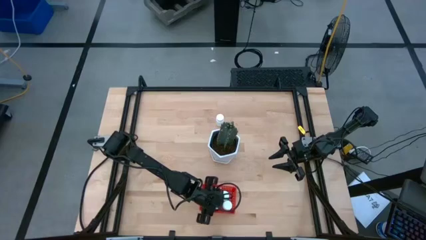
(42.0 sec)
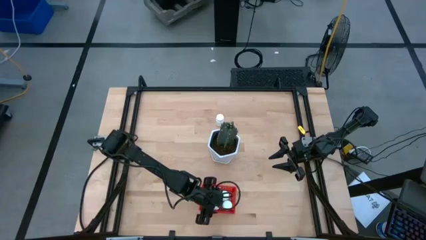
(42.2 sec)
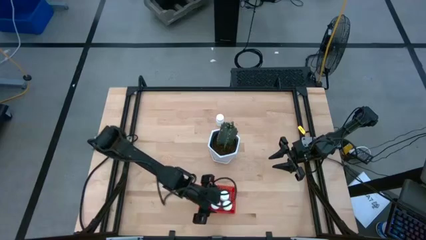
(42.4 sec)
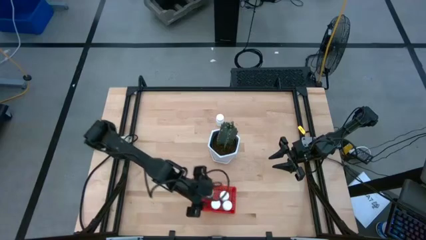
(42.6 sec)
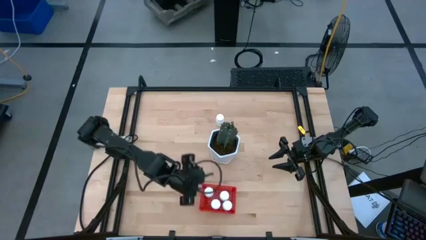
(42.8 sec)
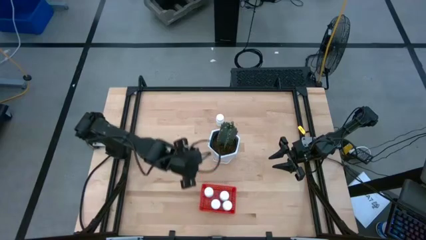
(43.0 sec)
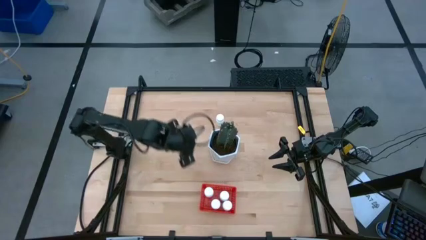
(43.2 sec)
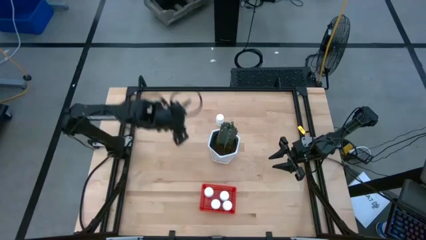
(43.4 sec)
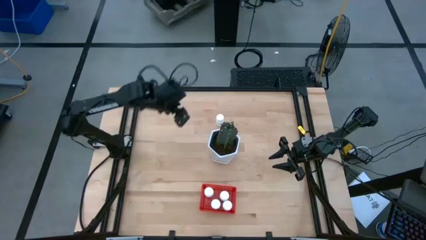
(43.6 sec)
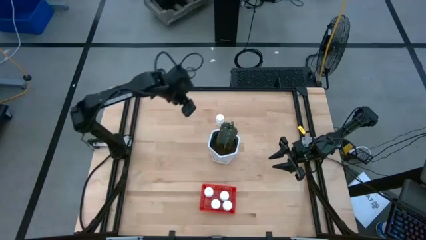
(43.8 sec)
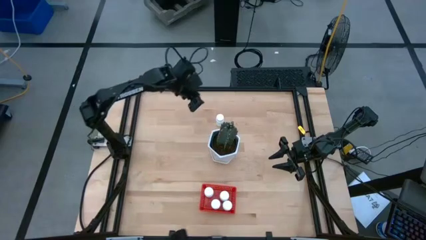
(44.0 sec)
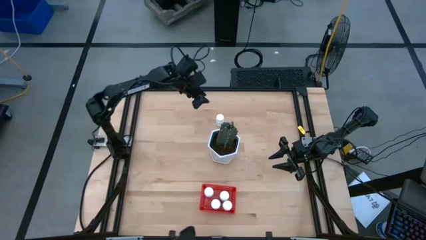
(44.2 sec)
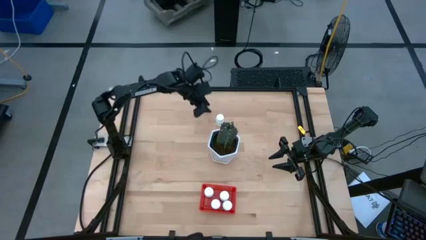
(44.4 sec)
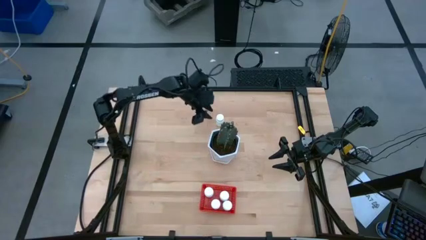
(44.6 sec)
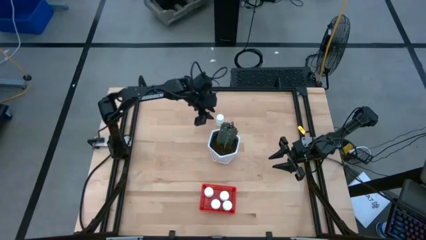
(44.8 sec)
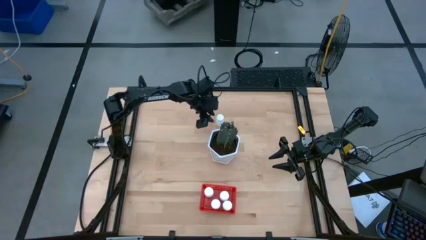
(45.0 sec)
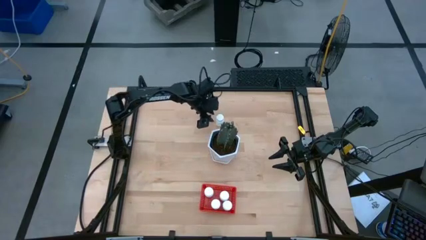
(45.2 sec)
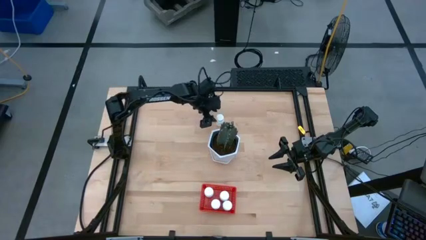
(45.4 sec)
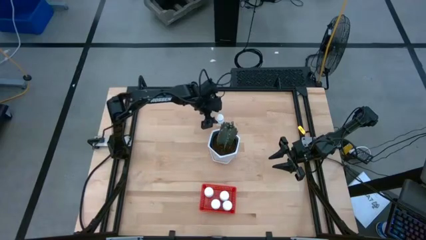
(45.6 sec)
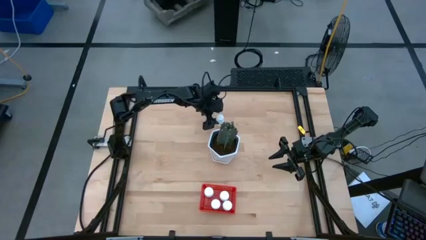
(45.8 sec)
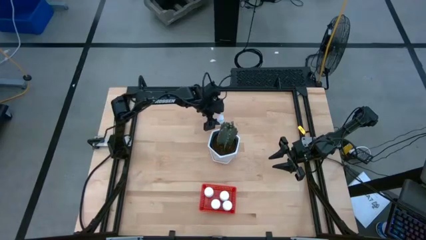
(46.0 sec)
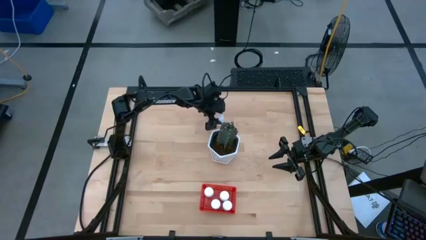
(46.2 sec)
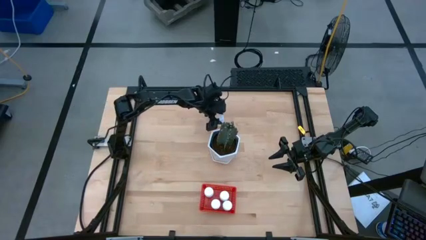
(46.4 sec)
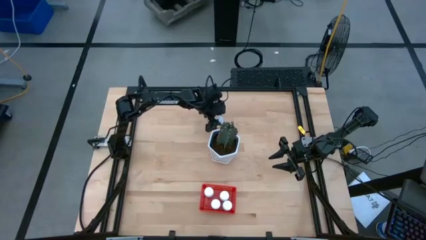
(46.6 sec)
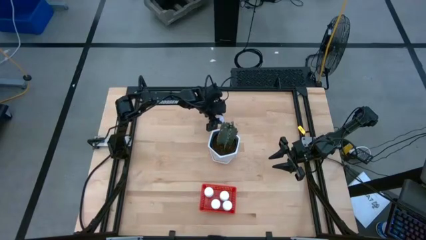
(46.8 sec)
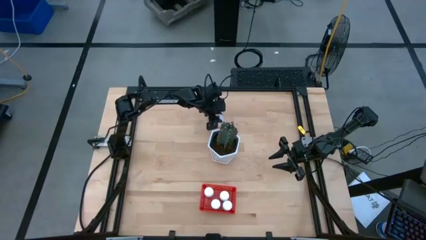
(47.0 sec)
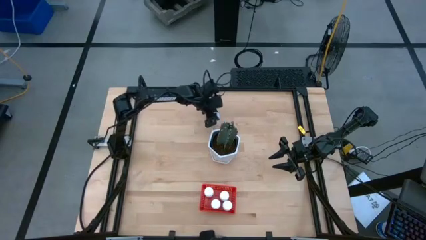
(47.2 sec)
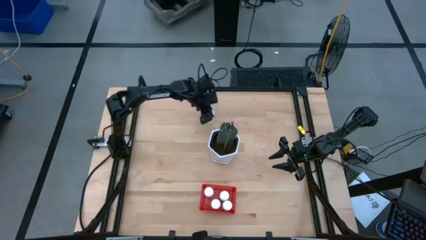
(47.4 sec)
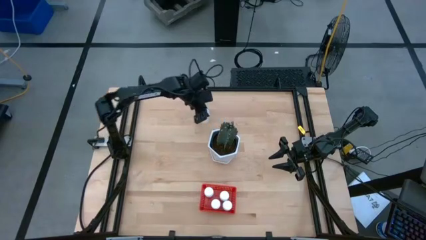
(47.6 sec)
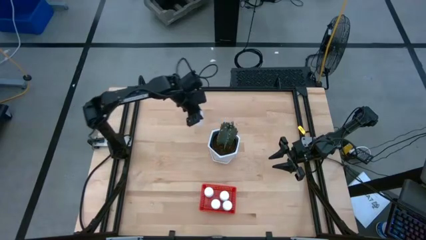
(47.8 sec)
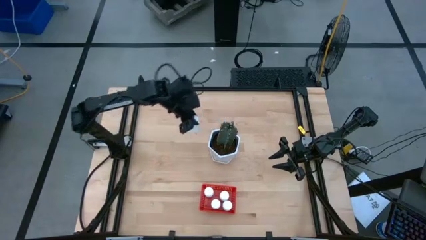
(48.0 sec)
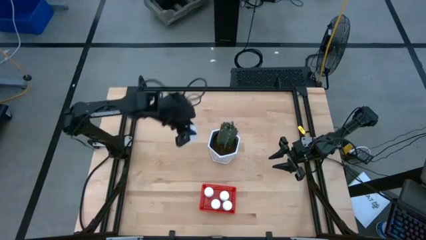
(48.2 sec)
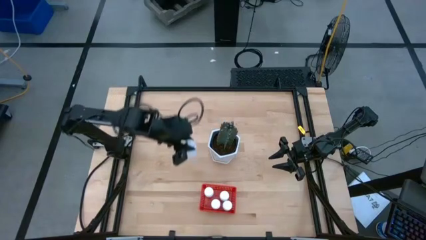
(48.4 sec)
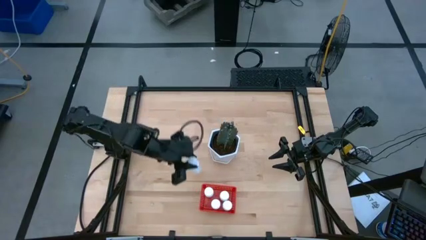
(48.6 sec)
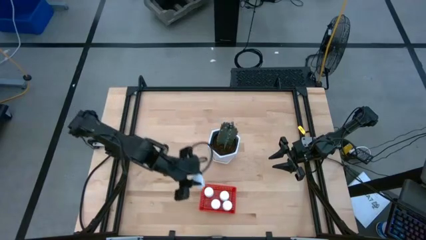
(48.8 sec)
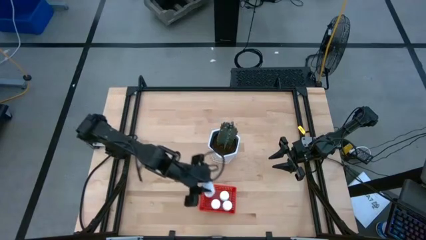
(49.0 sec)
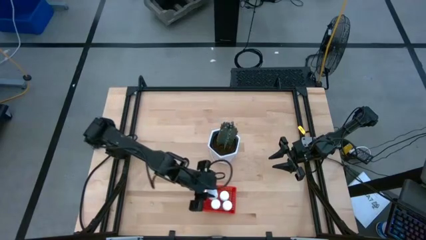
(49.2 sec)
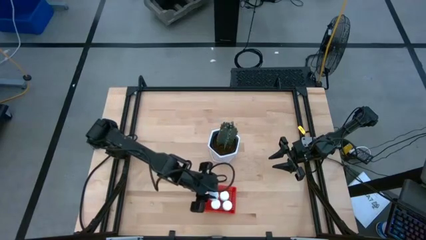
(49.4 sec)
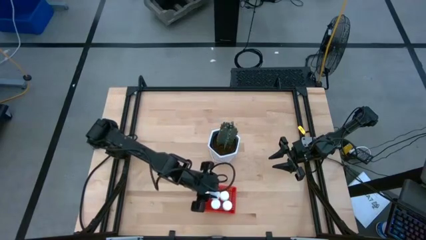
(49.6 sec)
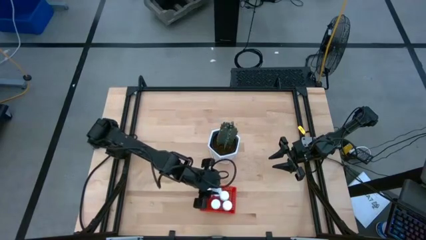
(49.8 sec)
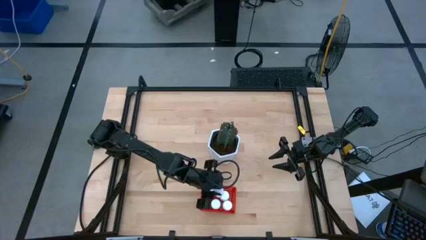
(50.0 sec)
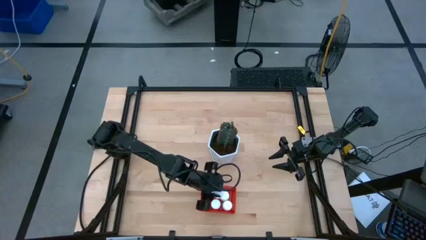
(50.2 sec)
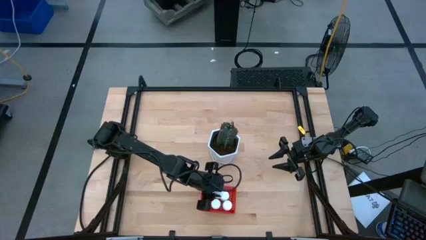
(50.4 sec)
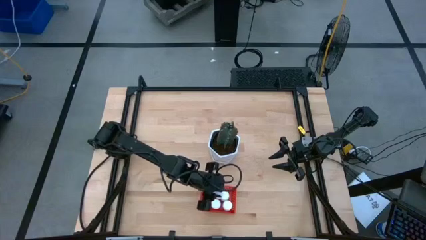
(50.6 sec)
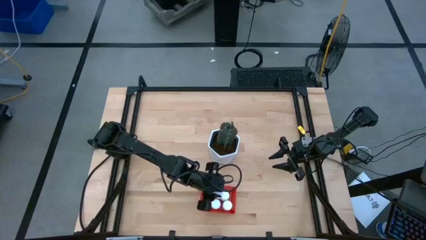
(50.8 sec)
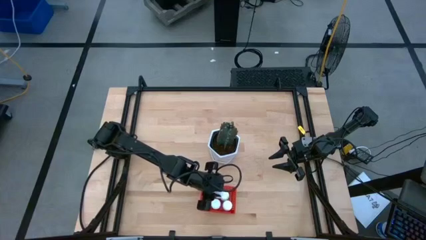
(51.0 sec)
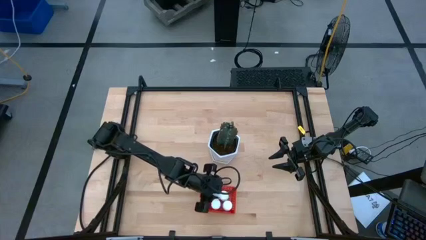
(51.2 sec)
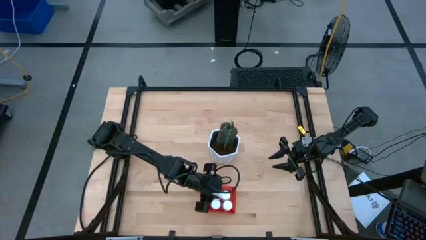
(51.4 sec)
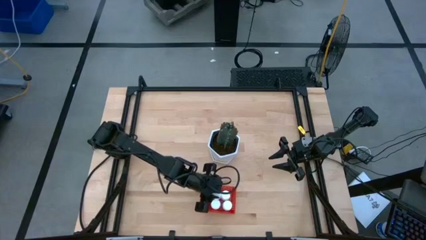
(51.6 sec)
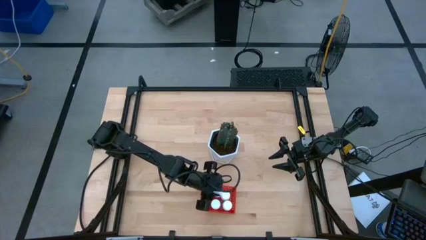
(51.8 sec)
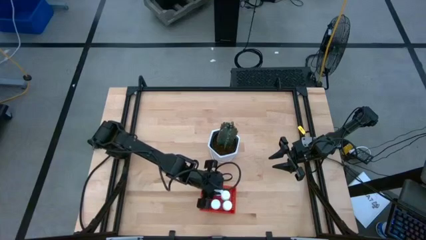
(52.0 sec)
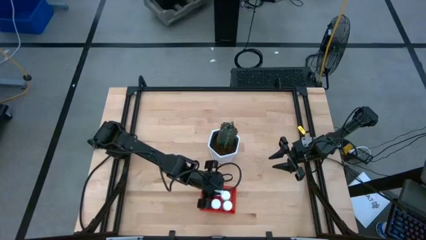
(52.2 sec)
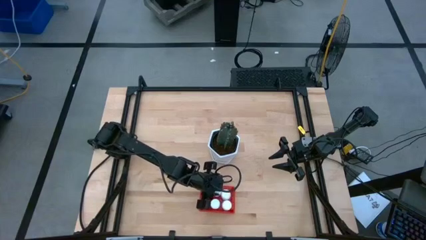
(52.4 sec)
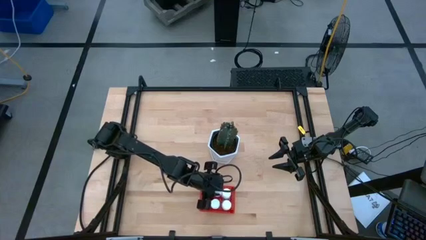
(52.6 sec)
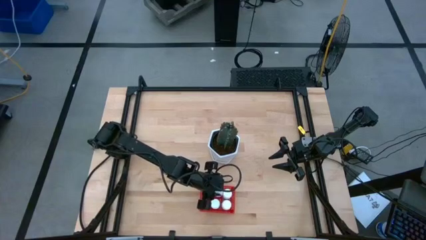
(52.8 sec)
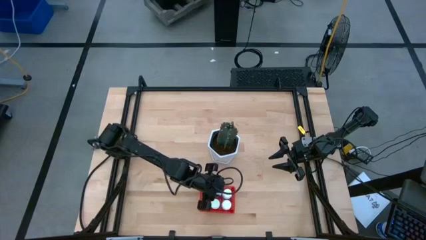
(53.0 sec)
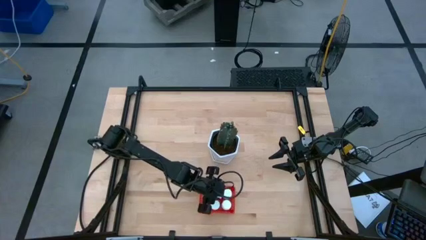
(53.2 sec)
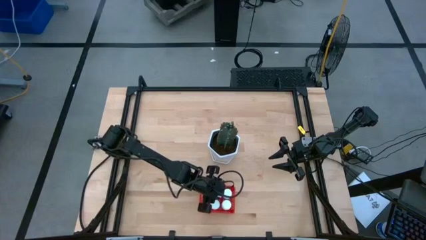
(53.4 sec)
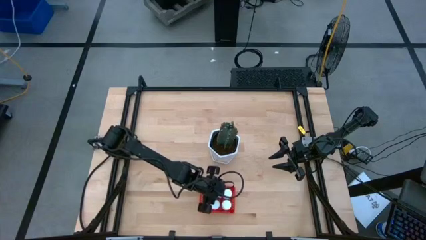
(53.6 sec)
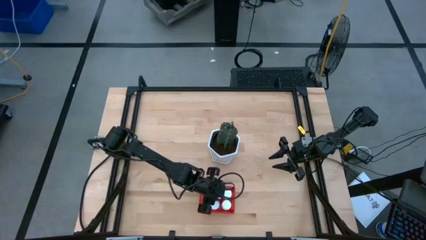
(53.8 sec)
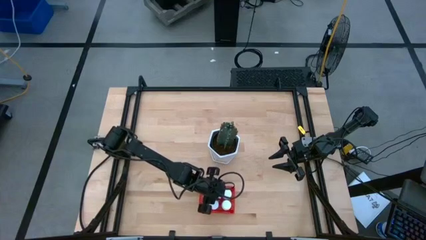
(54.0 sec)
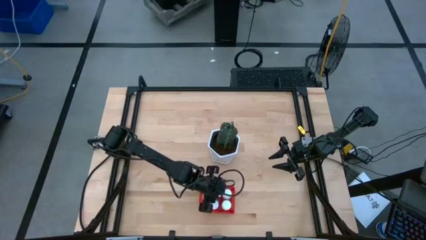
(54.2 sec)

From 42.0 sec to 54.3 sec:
Task: Pick and place pill bottles into a basket
Put the white medicine bottle into the red bin

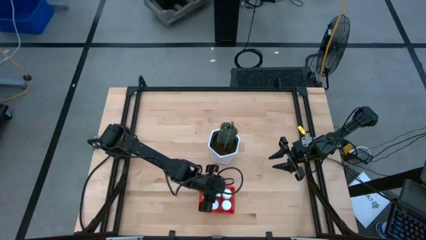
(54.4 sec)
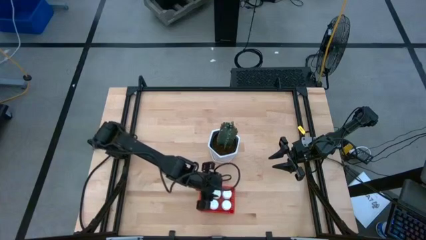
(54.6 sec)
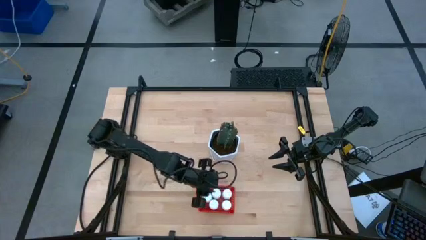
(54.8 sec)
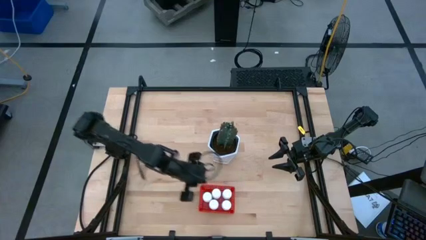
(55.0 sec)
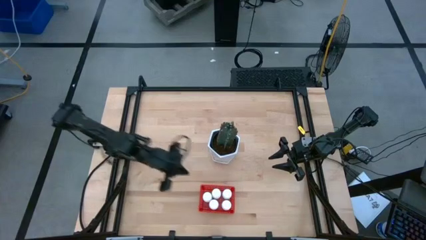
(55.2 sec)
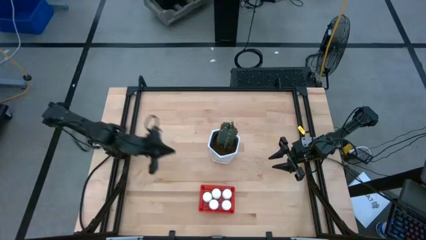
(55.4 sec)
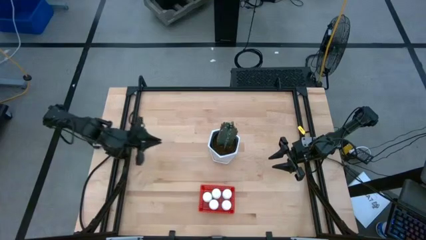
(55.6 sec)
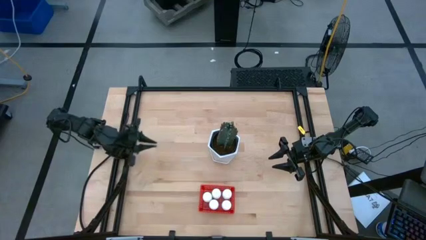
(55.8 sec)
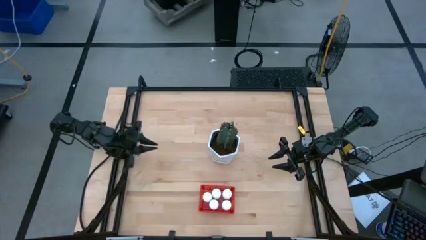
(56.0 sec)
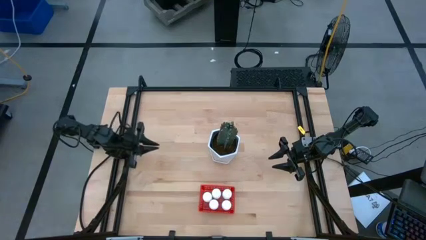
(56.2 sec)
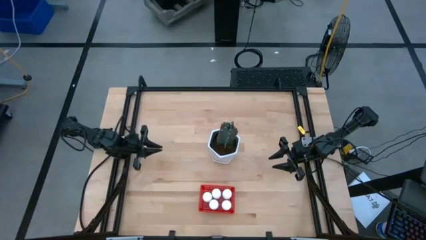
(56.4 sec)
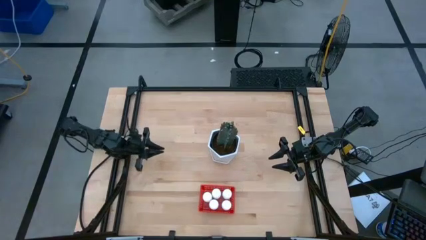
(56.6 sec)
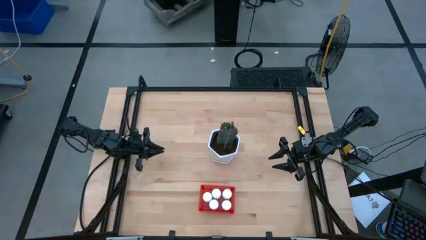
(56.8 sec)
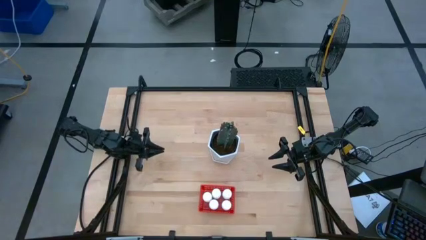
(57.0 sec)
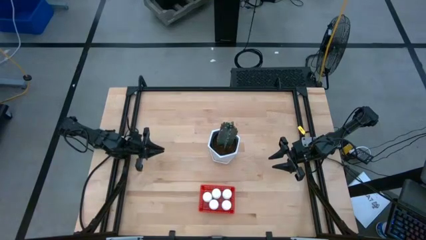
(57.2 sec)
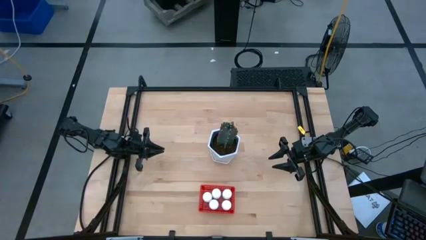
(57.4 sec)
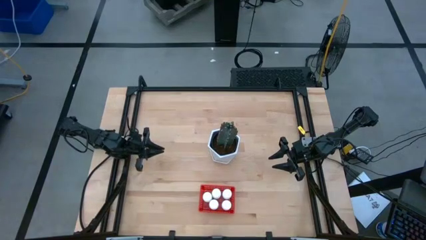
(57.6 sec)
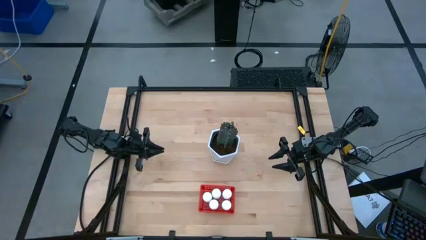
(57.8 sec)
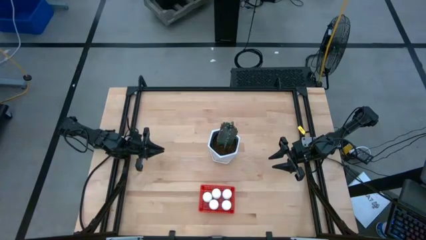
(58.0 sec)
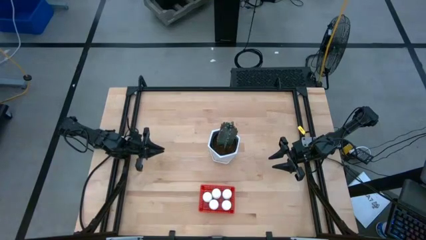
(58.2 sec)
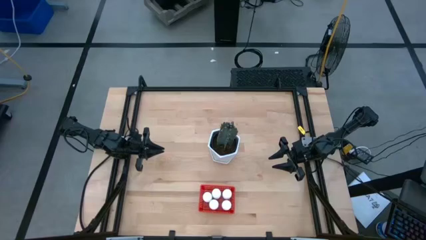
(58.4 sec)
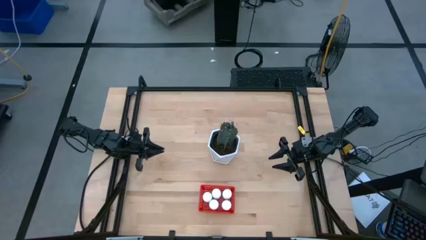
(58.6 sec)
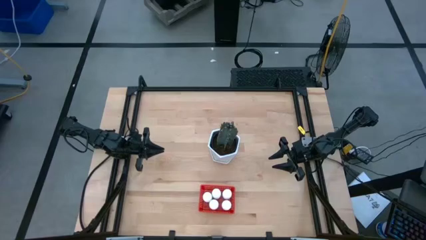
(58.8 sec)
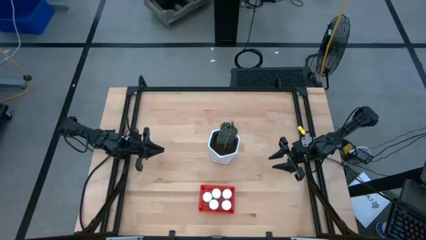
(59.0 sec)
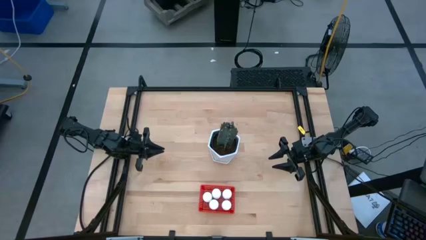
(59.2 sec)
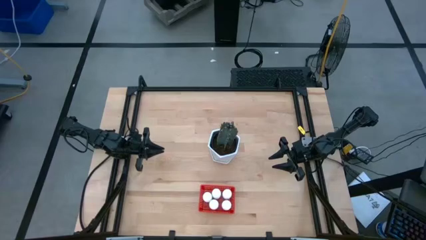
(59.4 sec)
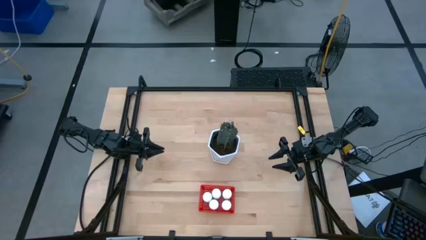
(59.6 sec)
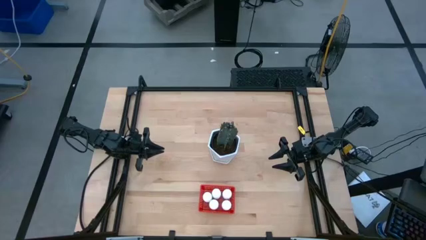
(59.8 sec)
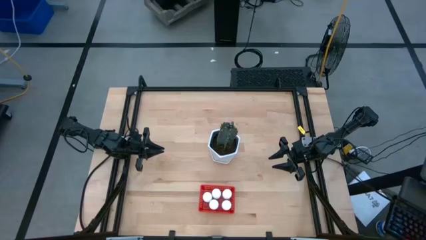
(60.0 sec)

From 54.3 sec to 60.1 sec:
Return to Home Position
